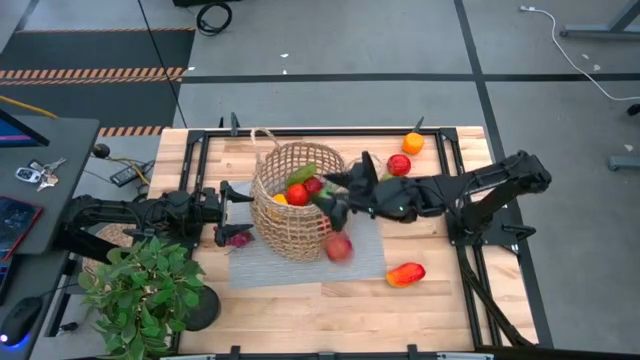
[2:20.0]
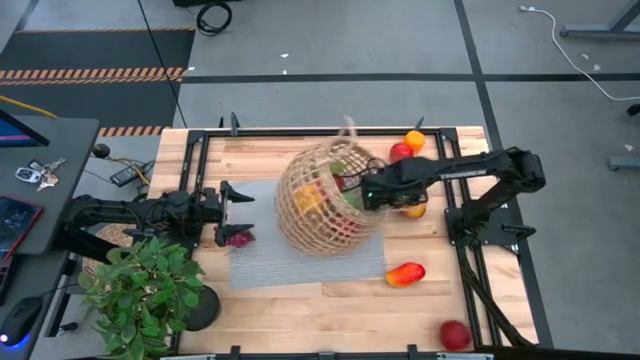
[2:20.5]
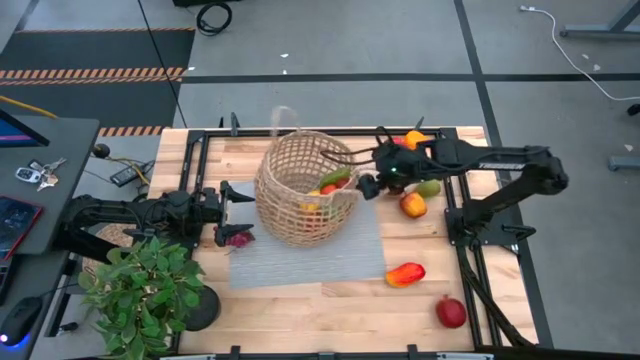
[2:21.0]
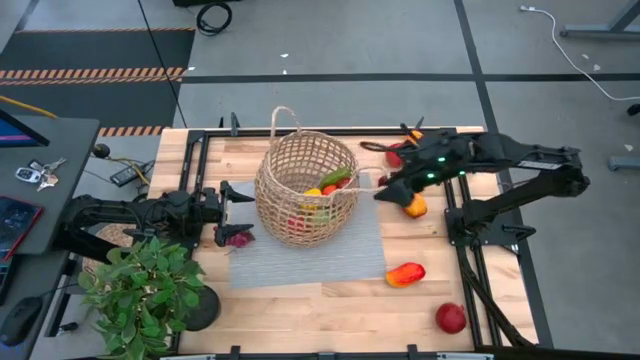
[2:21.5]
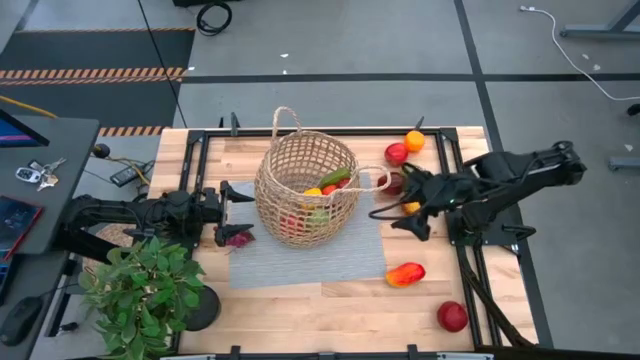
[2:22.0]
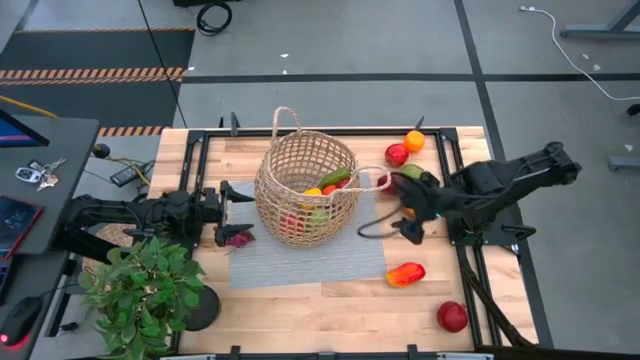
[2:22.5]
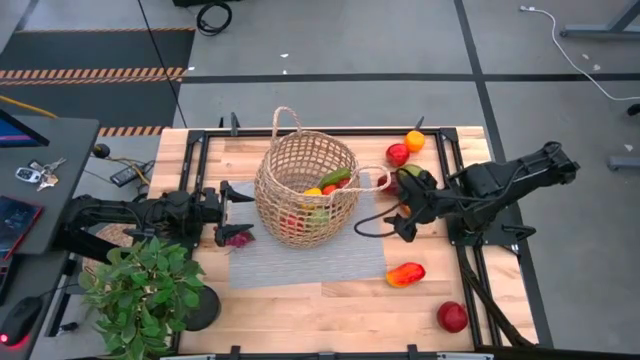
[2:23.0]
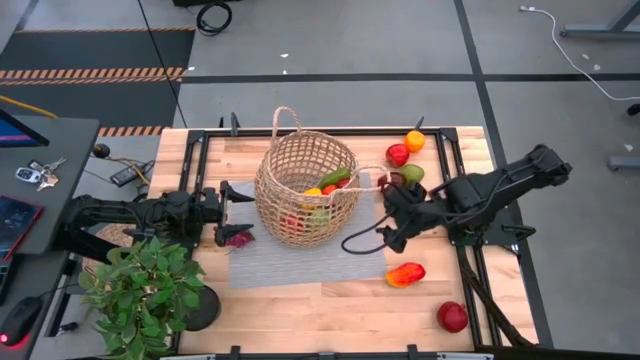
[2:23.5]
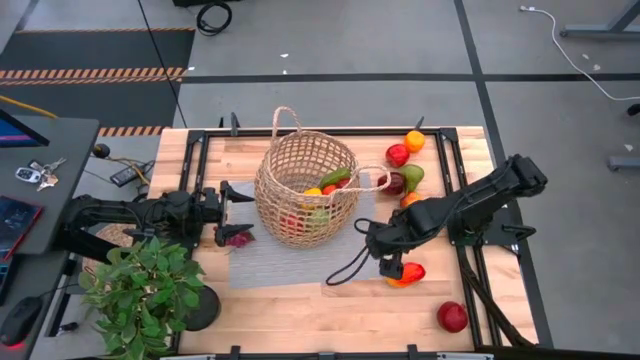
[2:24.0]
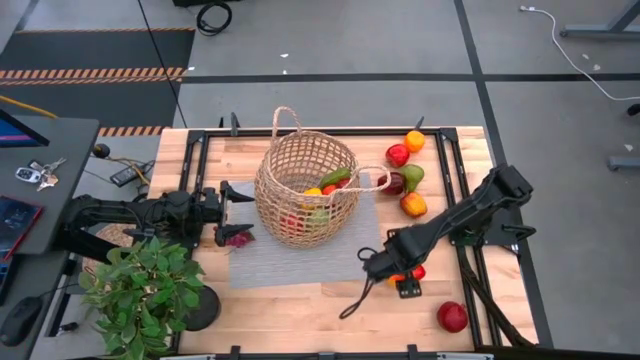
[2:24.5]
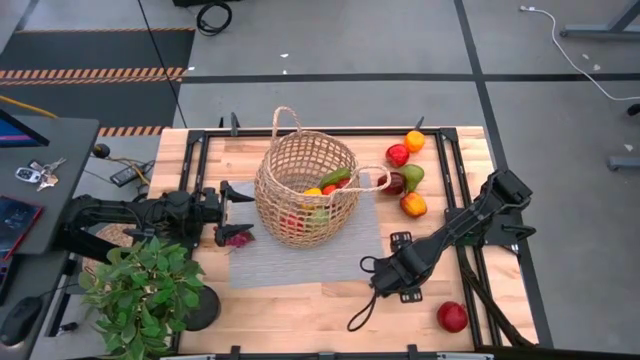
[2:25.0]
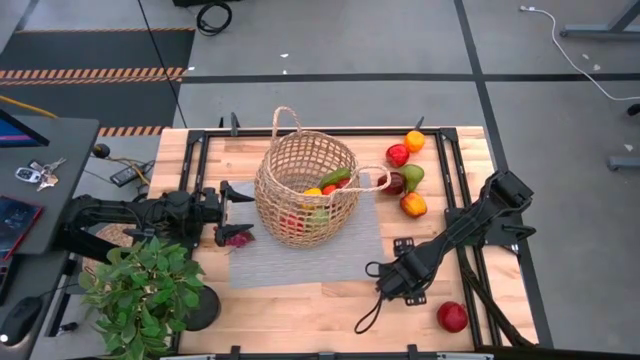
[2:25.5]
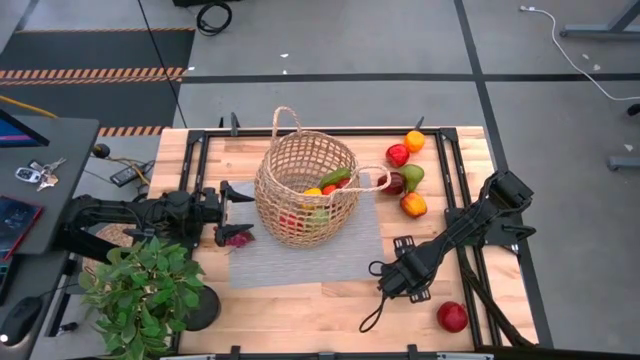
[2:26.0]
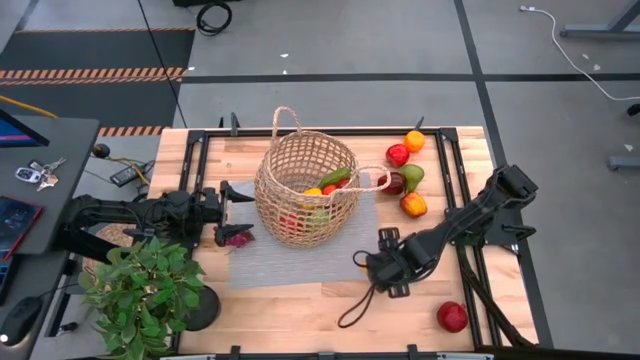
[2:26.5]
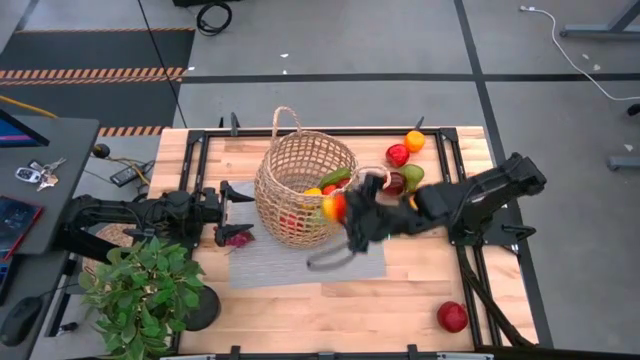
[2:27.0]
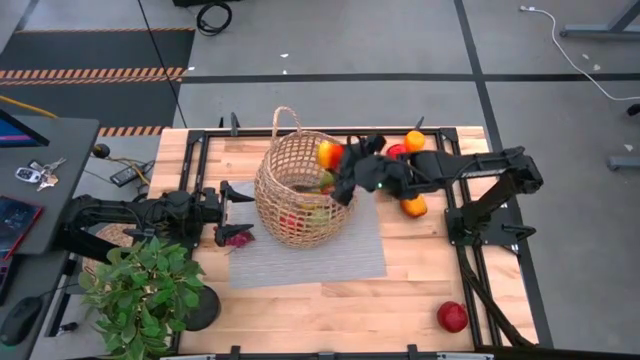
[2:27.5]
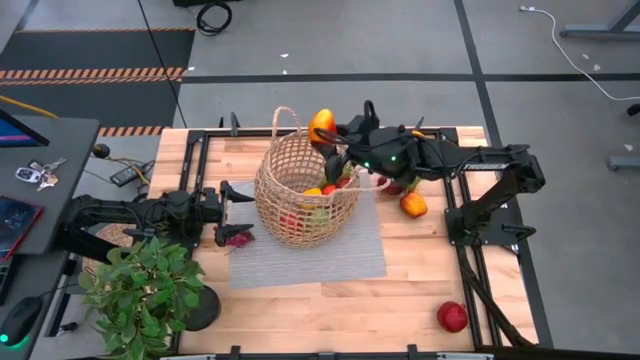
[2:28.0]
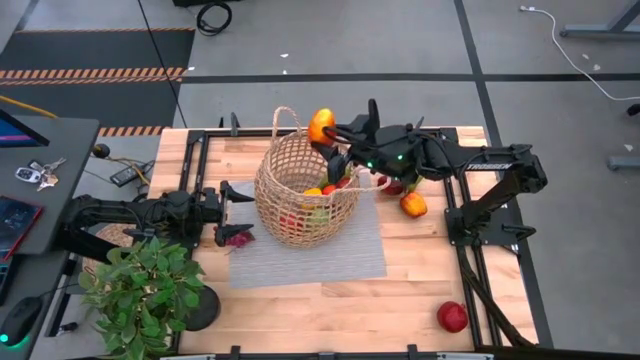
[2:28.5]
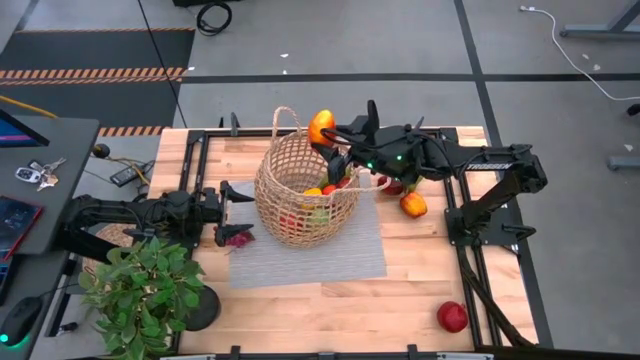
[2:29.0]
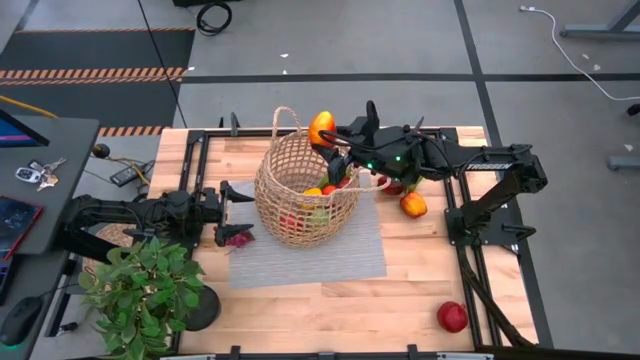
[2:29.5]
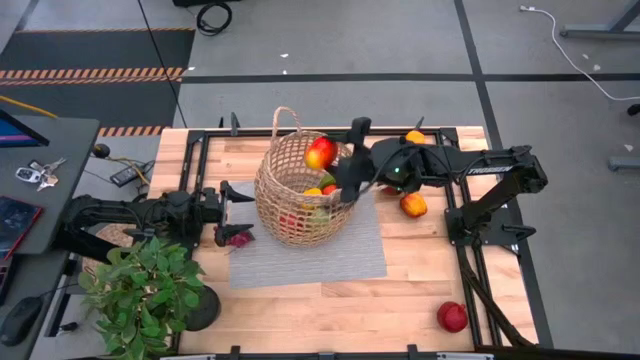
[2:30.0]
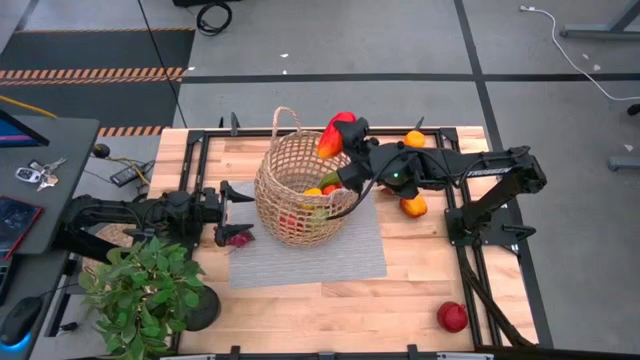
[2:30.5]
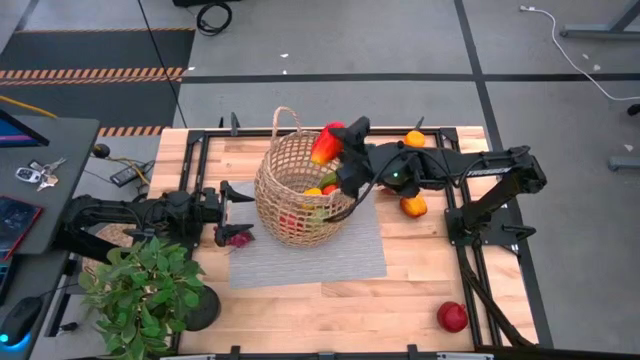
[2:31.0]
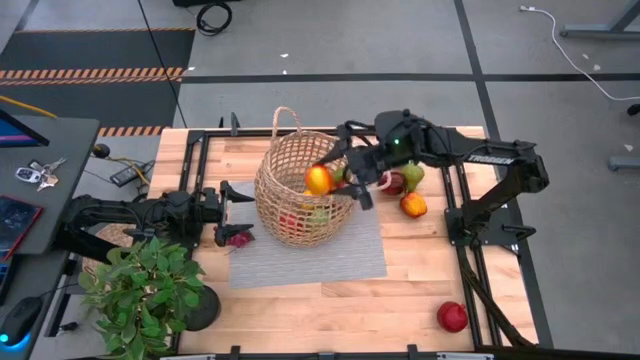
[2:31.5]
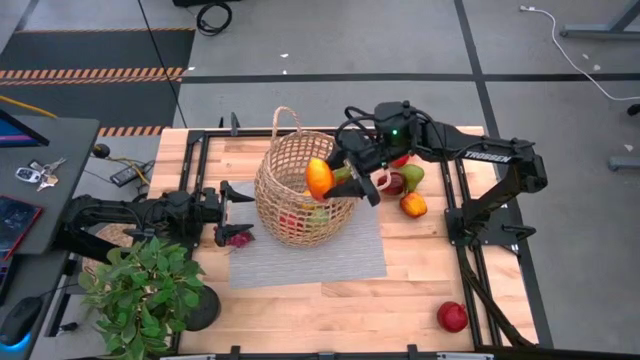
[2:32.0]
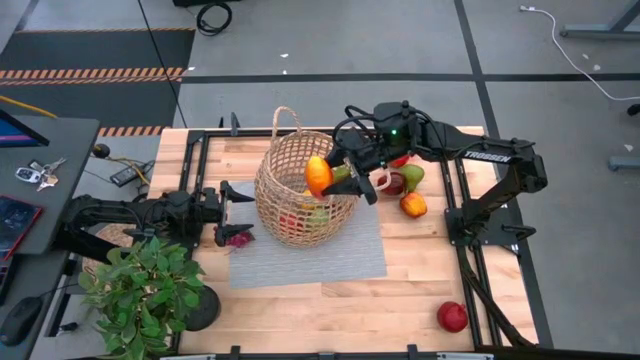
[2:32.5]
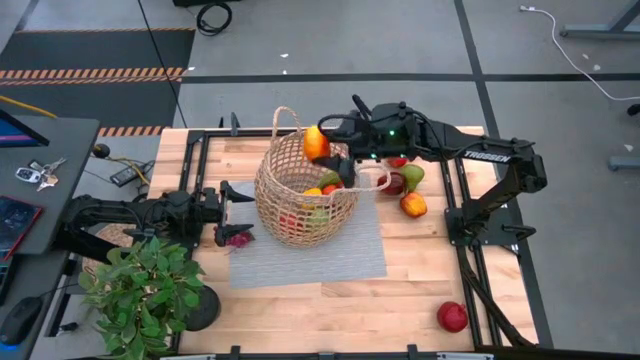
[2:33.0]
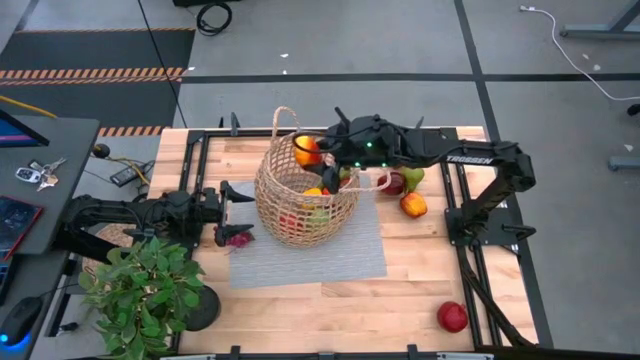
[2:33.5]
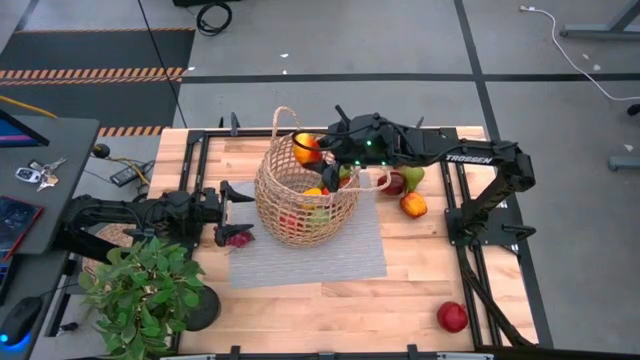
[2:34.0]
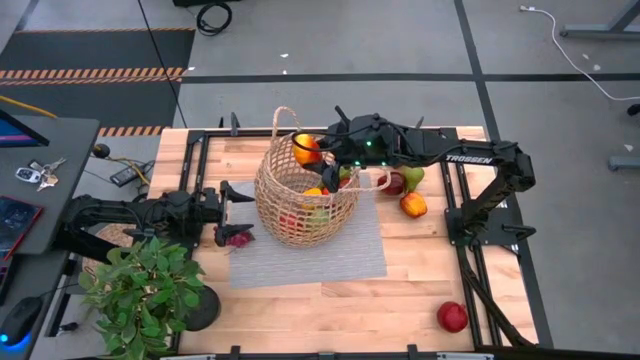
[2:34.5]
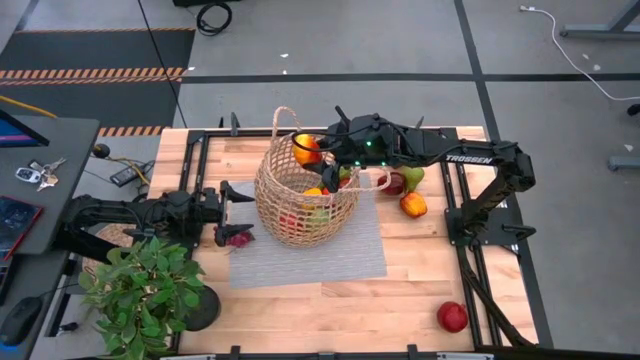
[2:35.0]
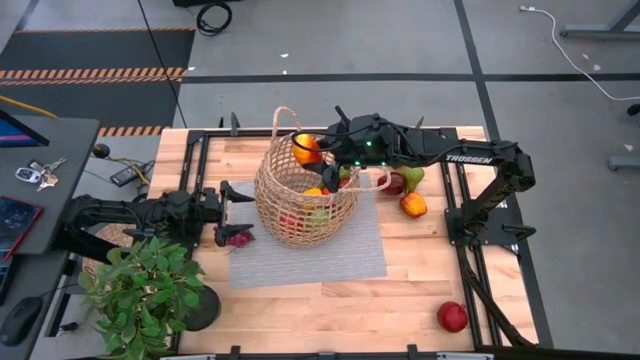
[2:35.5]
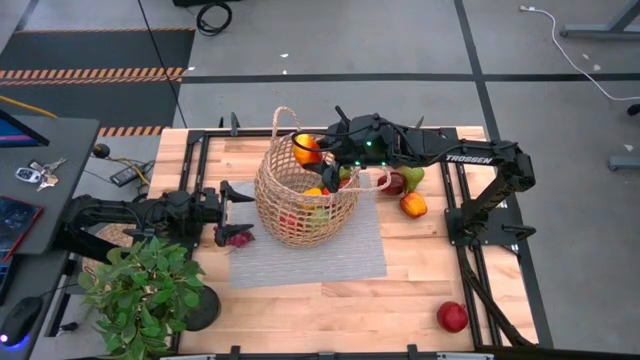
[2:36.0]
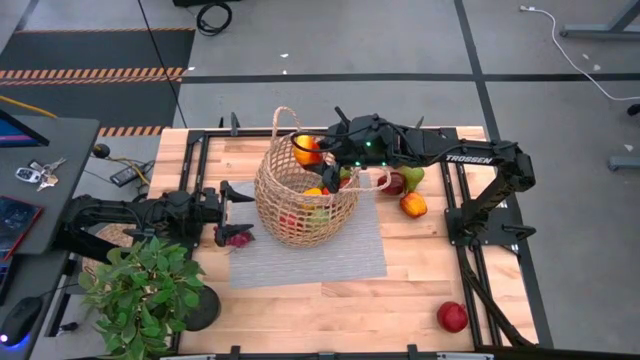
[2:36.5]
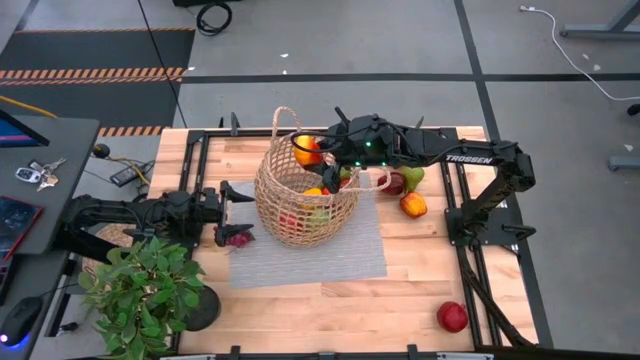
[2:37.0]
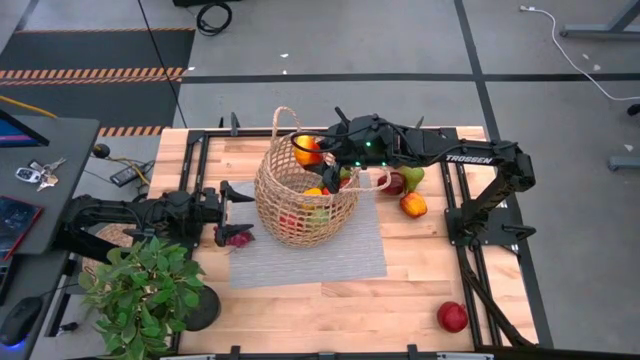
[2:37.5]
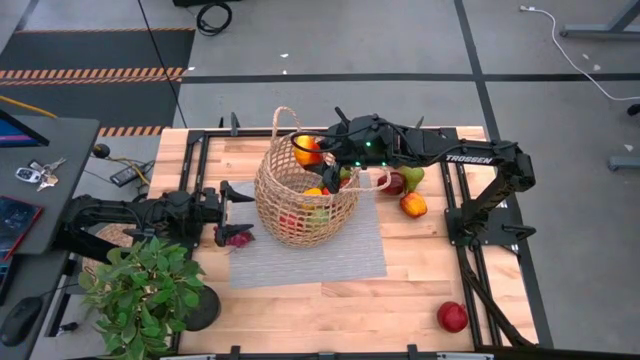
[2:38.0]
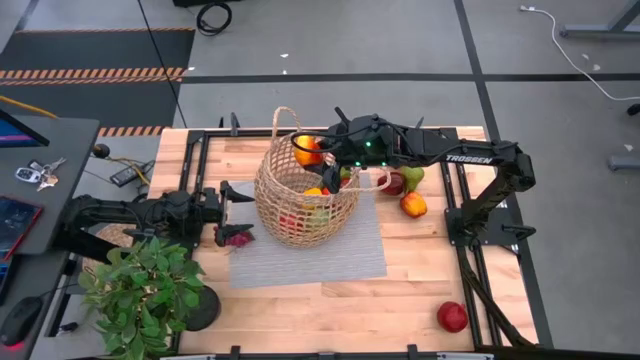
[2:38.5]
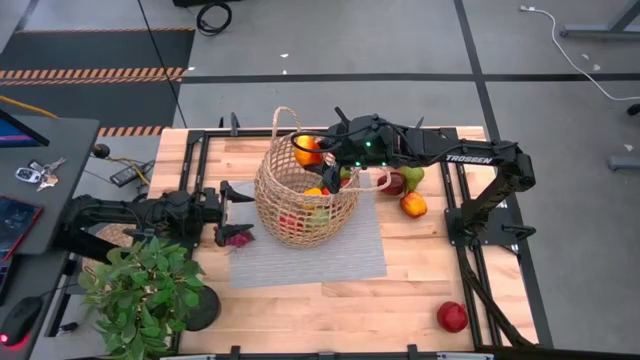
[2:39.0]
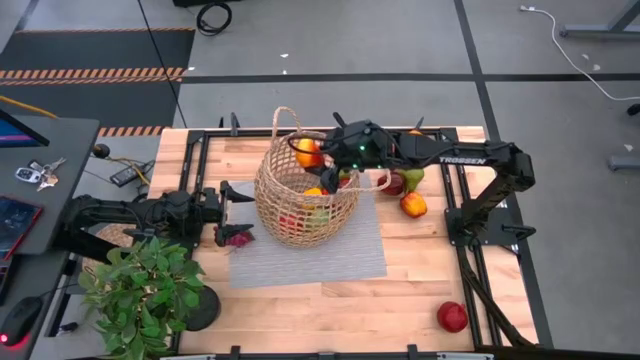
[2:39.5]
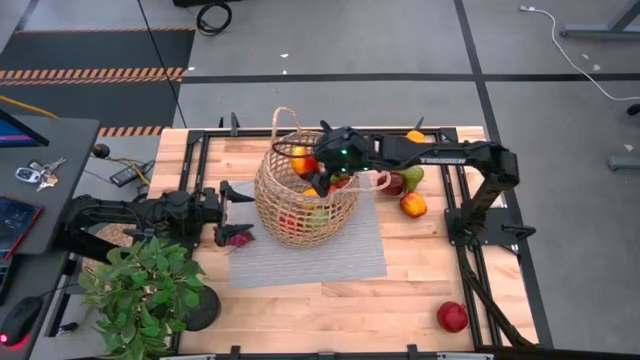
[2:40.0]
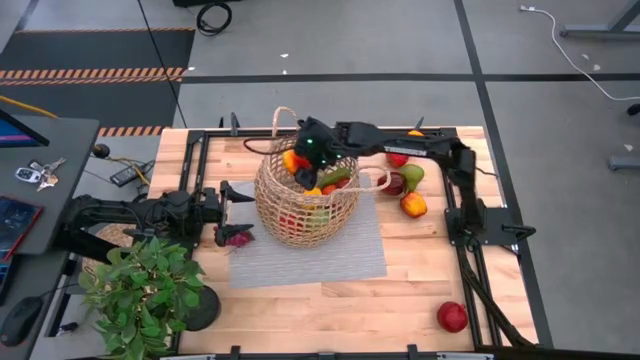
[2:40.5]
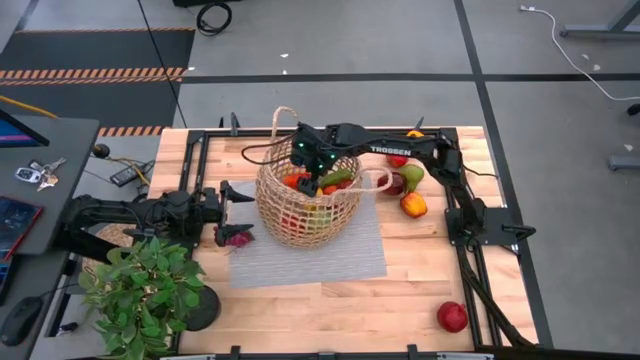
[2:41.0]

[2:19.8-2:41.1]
Task: Build produce basket
Put the orange mango into the brown basket
